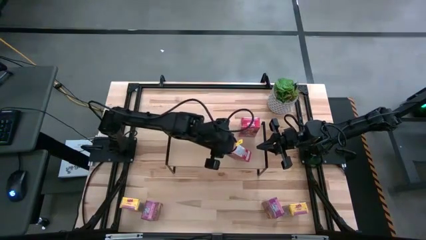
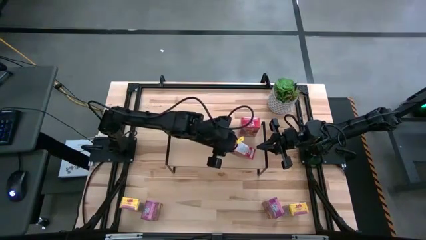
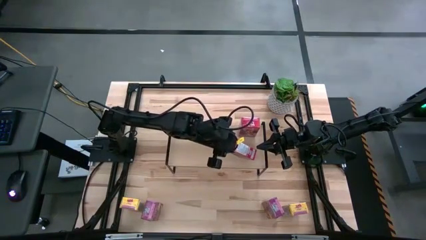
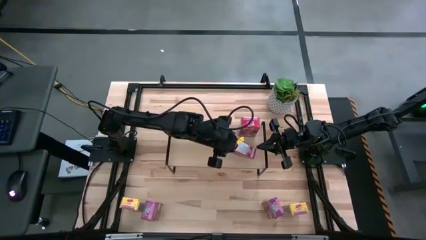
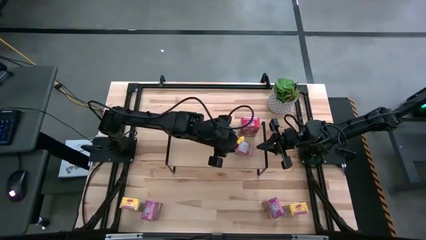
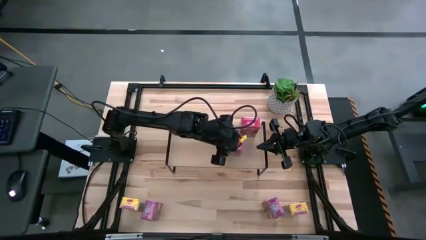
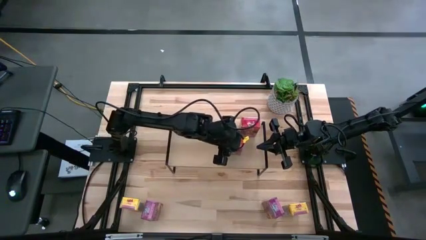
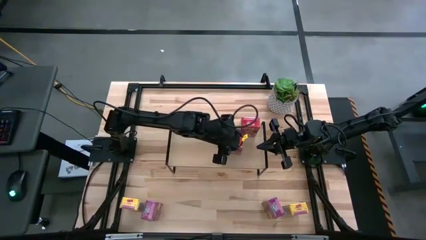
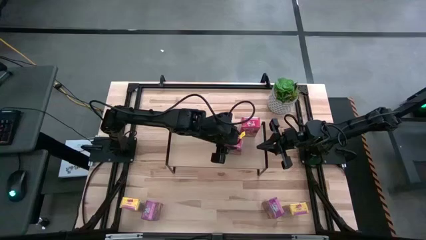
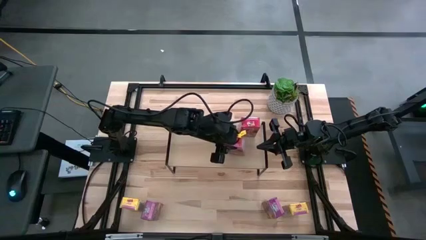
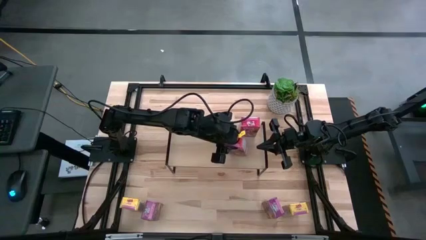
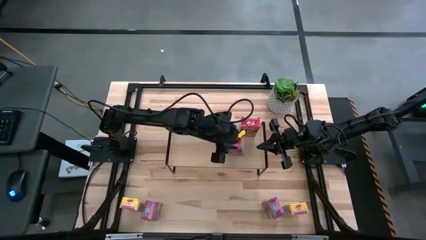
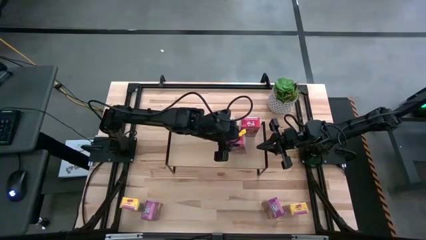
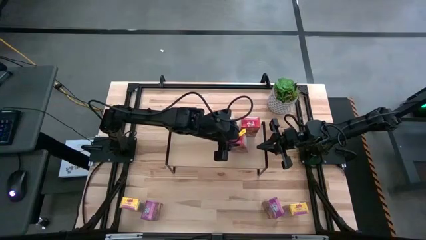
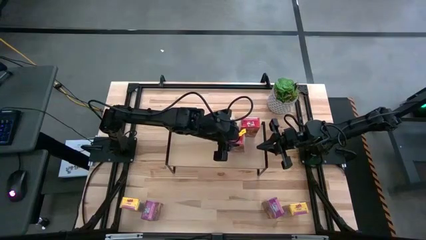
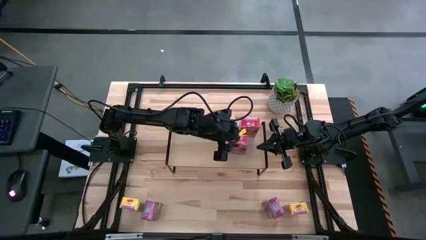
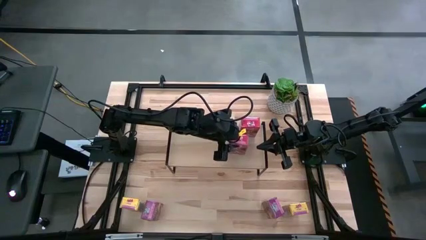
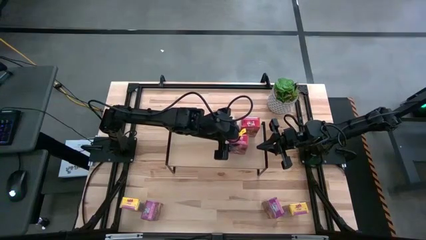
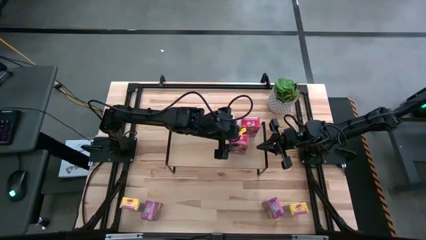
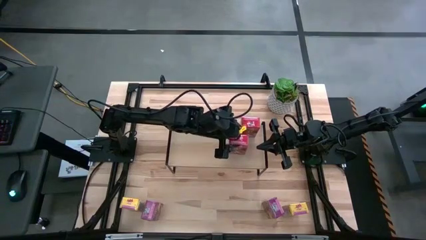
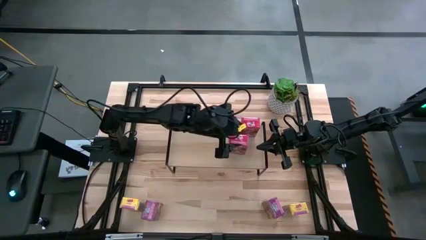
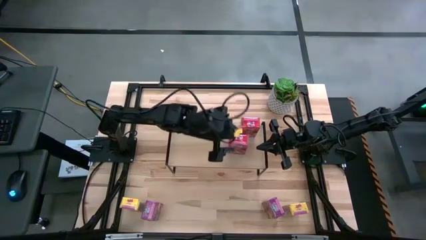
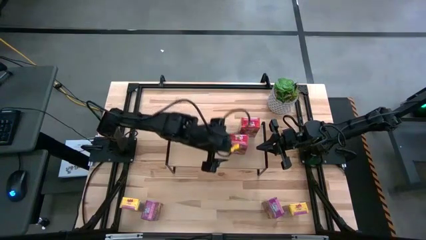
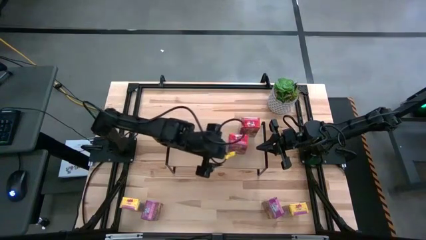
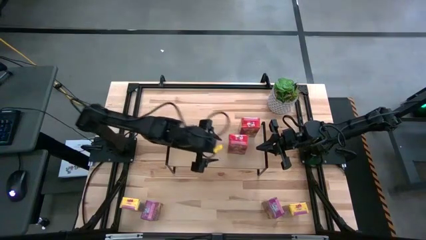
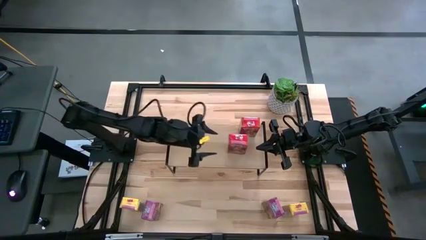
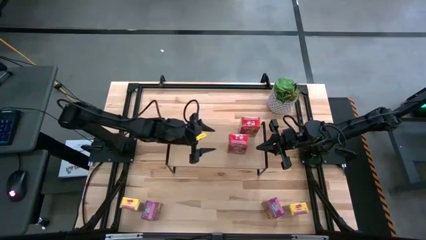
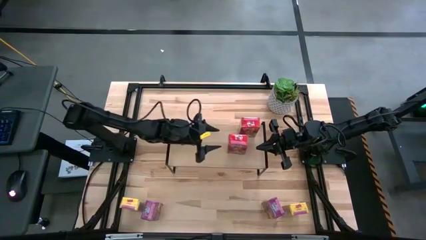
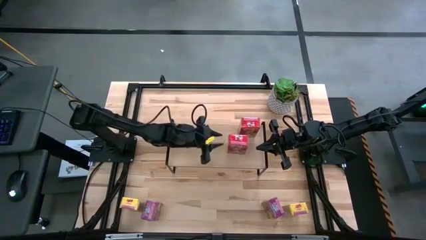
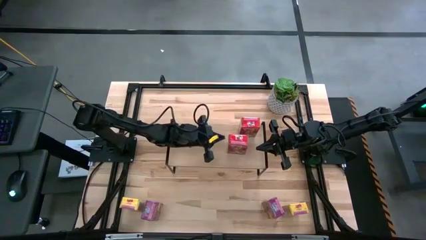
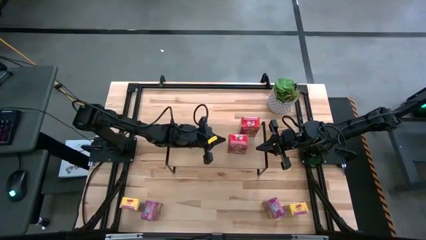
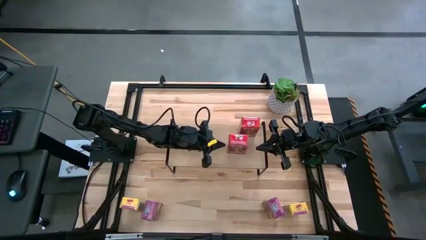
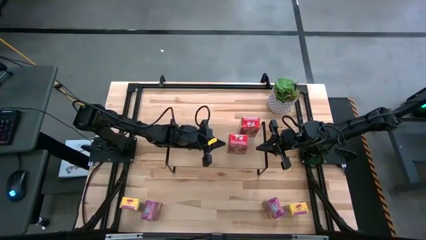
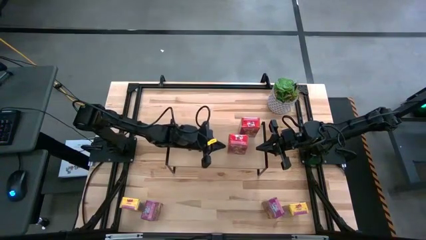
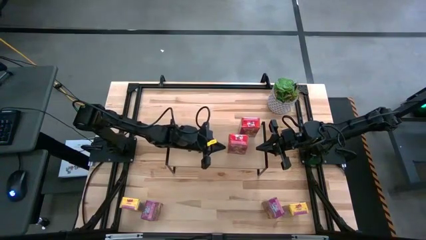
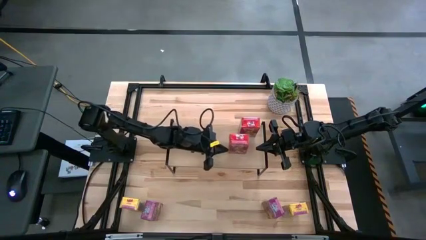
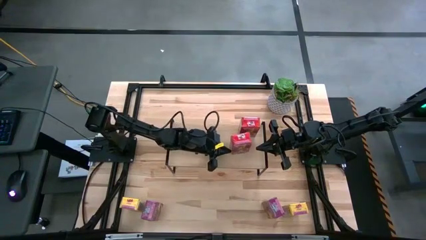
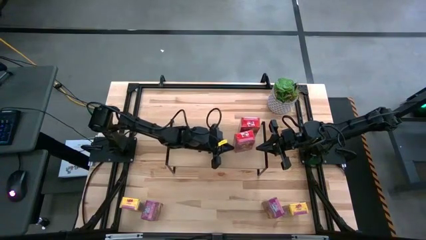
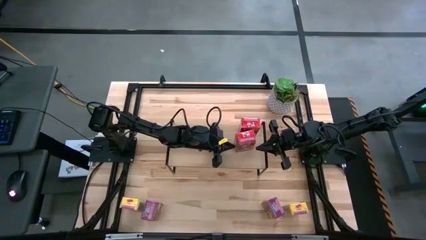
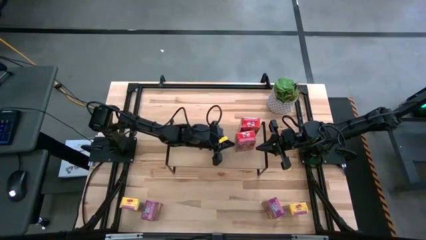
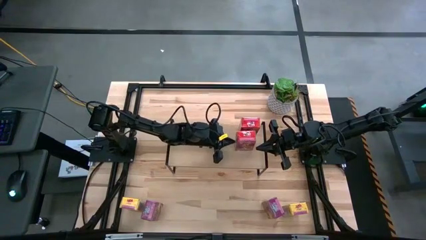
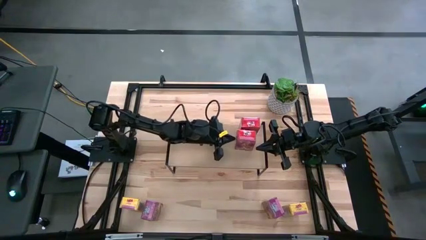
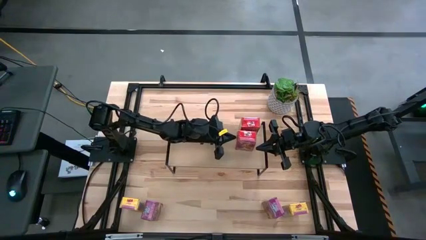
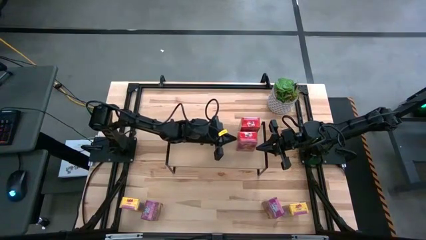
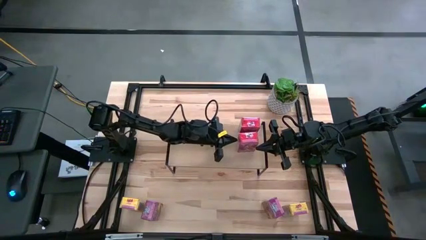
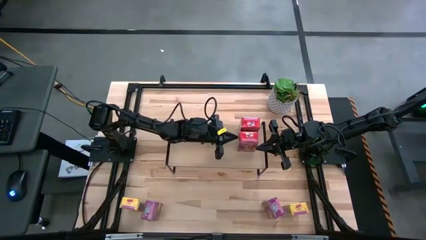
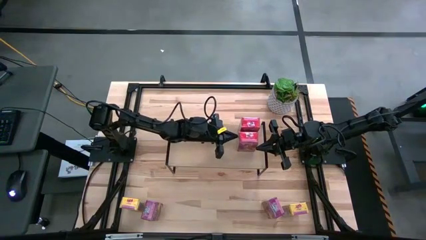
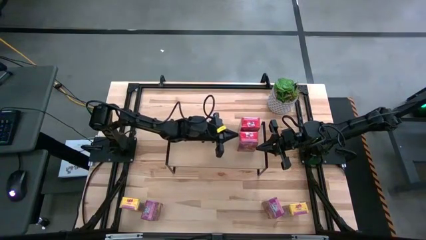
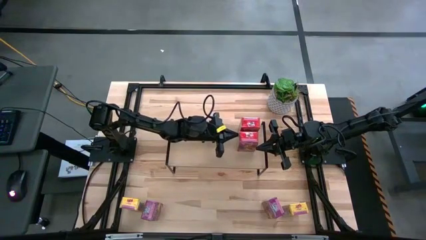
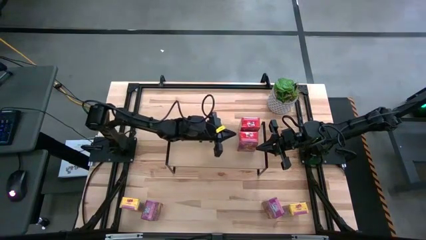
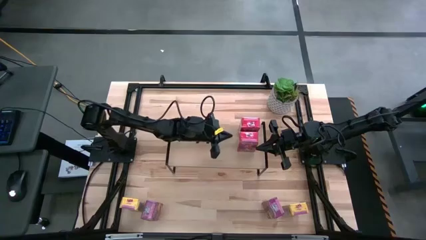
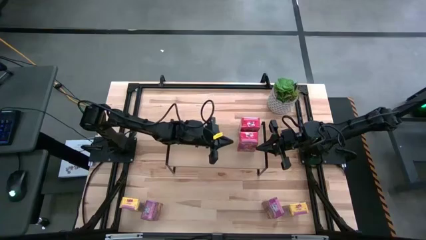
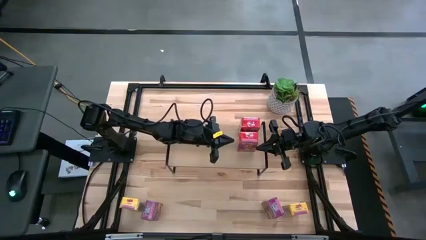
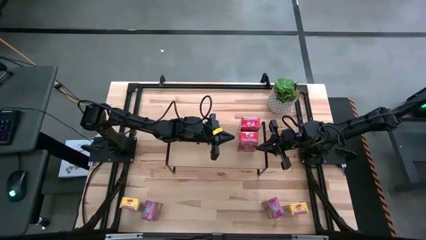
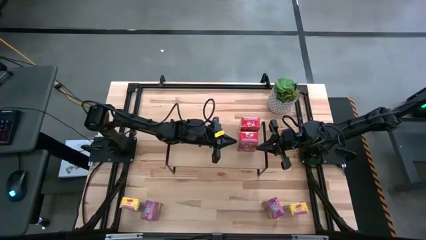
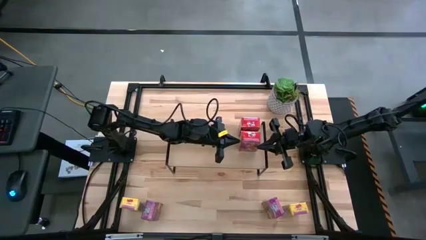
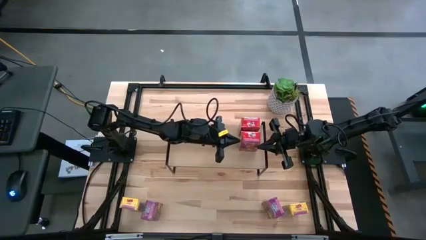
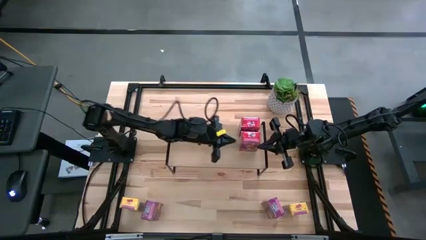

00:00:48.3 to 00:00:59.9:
Task: Stack cereal on shelf
Put the red cereal box on the shelf aligned with the red cereal box
